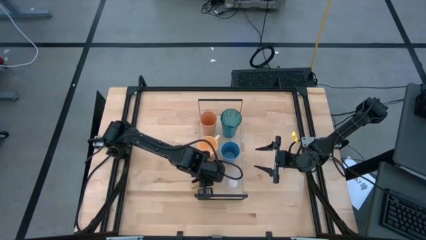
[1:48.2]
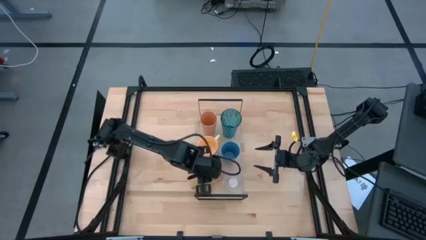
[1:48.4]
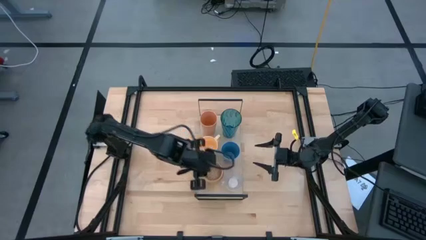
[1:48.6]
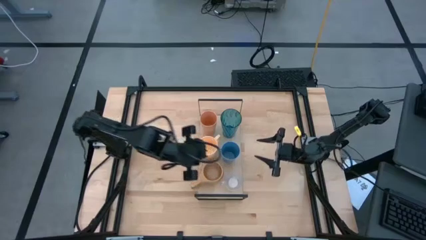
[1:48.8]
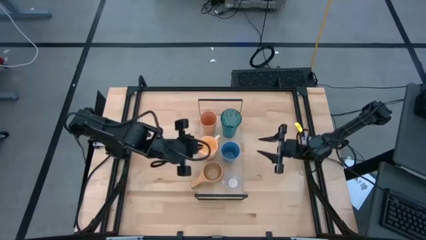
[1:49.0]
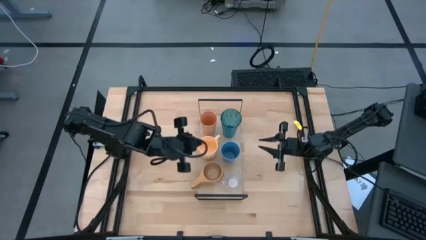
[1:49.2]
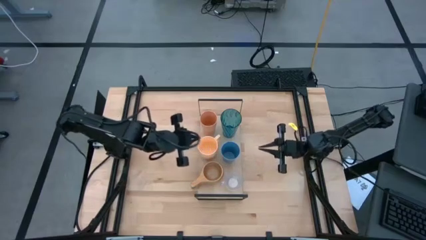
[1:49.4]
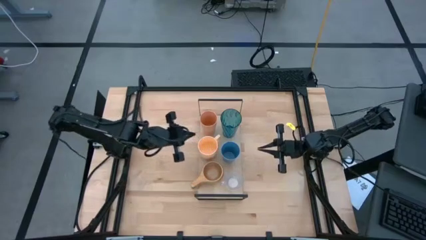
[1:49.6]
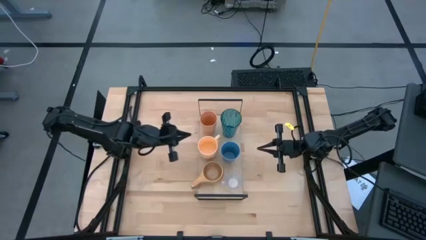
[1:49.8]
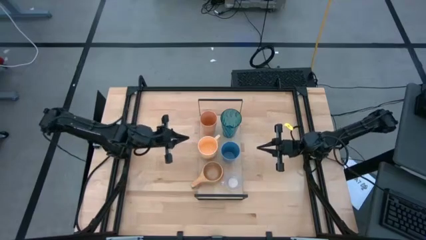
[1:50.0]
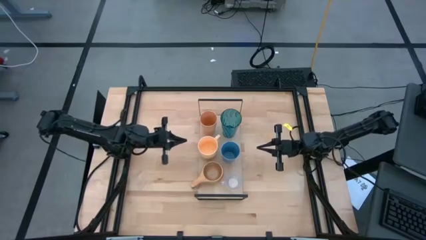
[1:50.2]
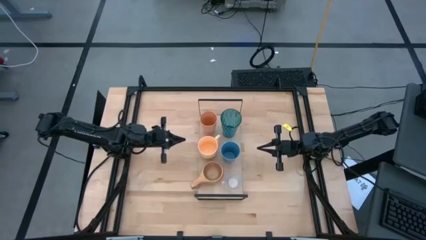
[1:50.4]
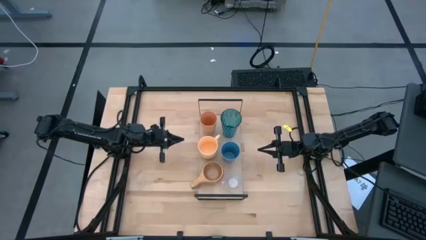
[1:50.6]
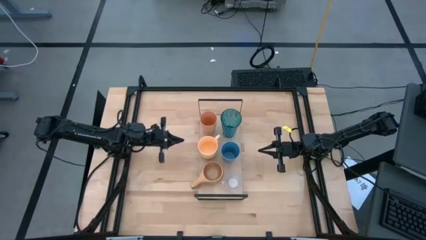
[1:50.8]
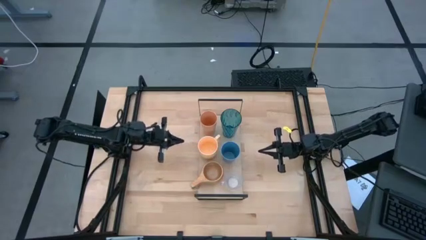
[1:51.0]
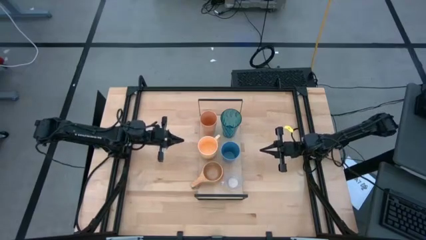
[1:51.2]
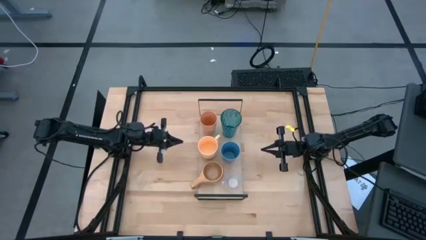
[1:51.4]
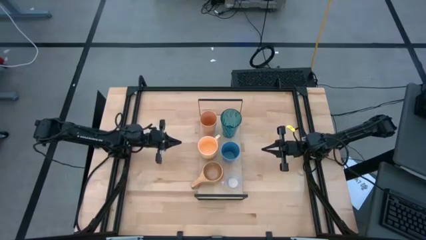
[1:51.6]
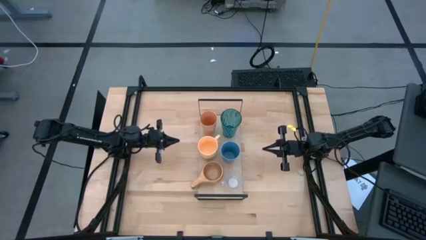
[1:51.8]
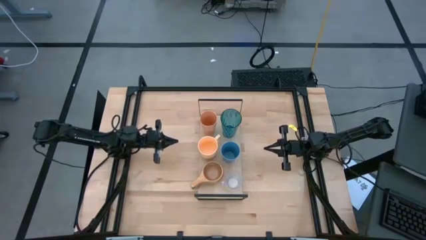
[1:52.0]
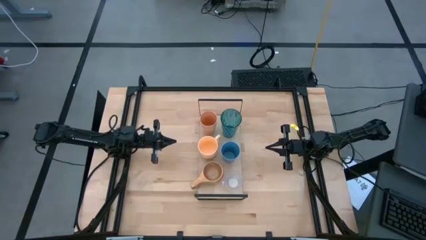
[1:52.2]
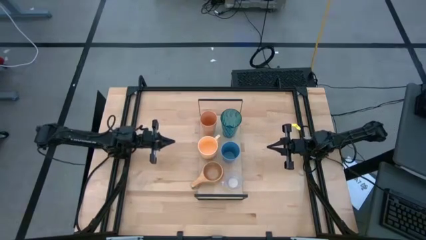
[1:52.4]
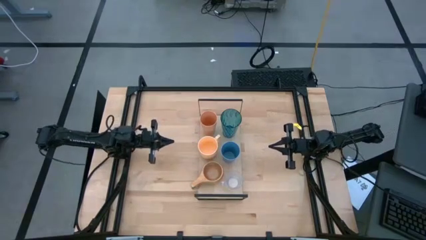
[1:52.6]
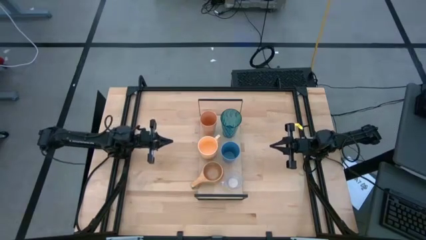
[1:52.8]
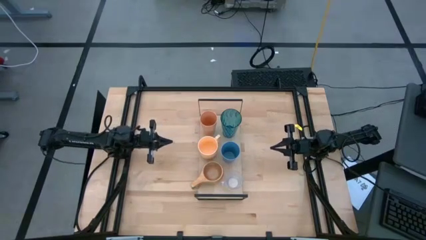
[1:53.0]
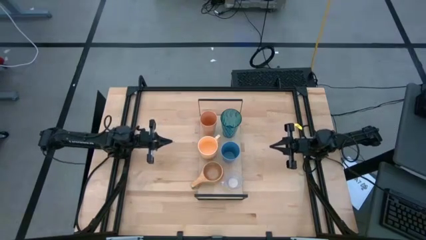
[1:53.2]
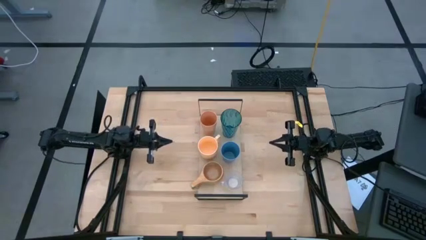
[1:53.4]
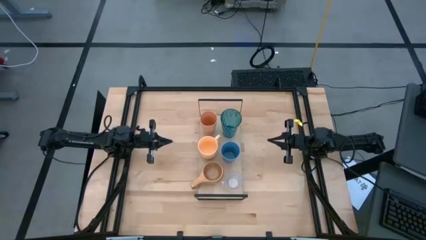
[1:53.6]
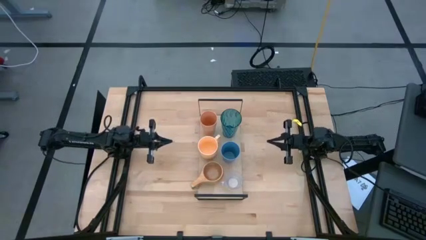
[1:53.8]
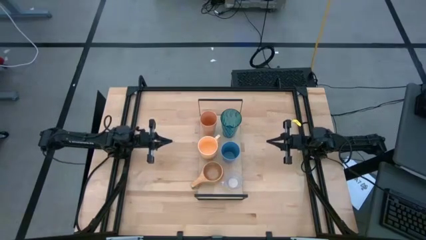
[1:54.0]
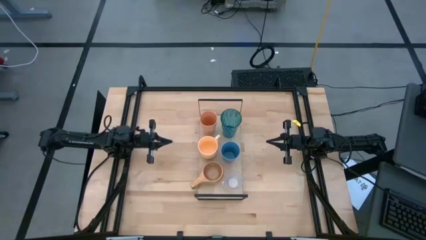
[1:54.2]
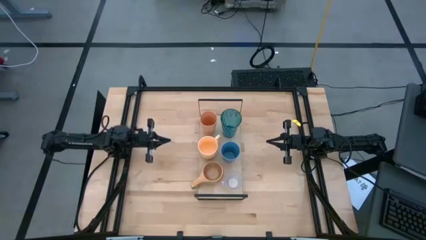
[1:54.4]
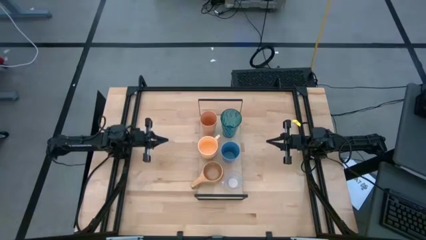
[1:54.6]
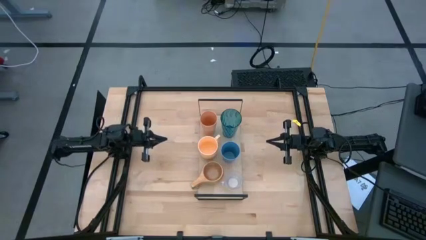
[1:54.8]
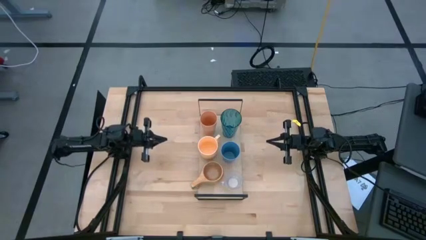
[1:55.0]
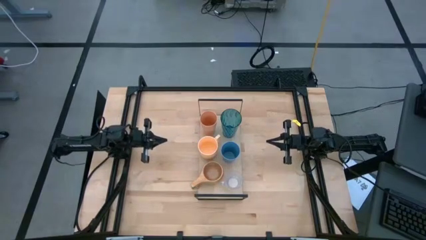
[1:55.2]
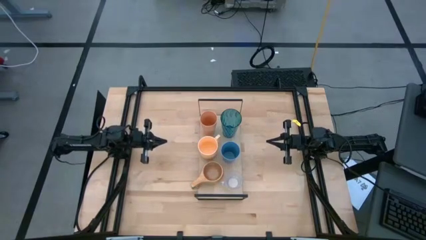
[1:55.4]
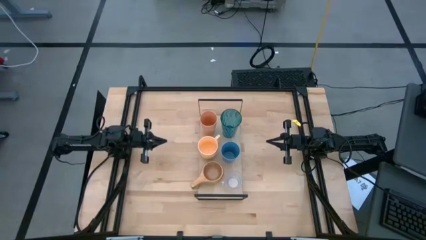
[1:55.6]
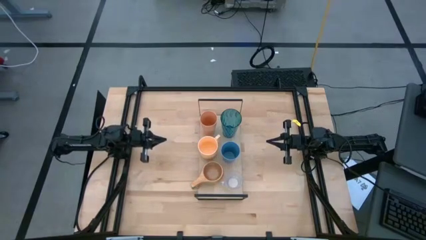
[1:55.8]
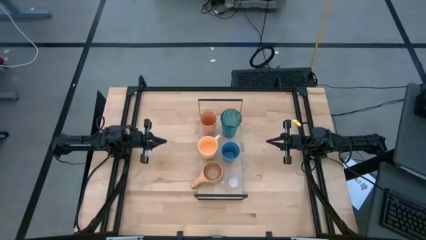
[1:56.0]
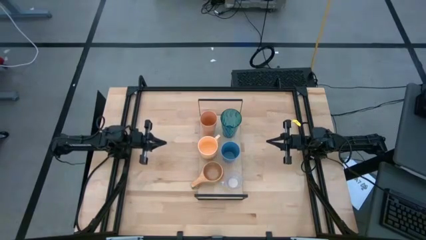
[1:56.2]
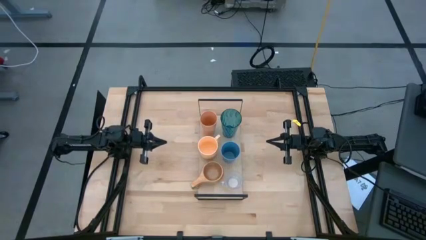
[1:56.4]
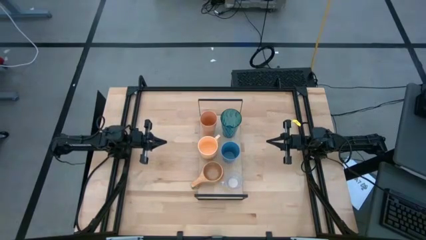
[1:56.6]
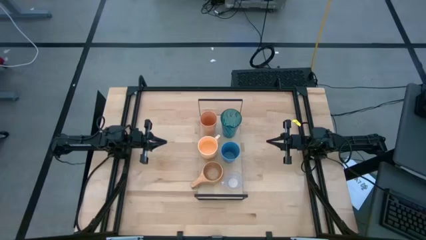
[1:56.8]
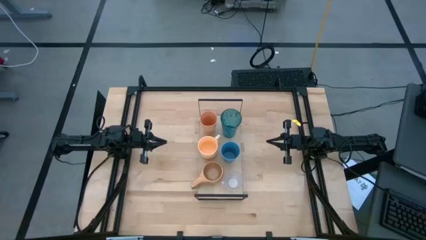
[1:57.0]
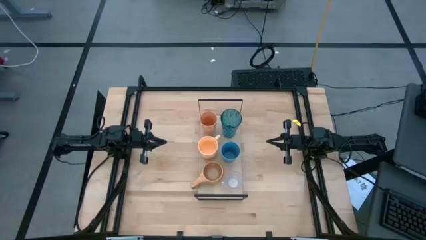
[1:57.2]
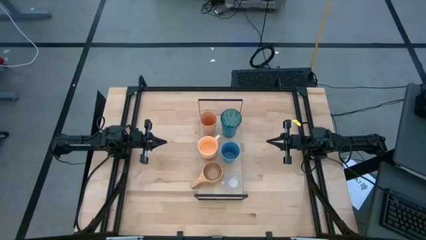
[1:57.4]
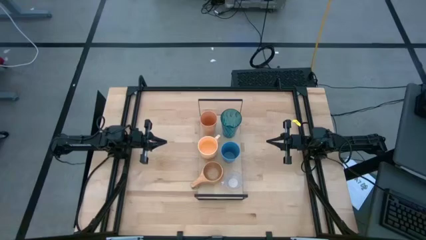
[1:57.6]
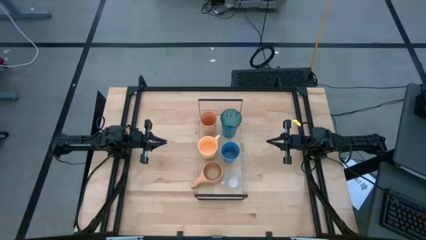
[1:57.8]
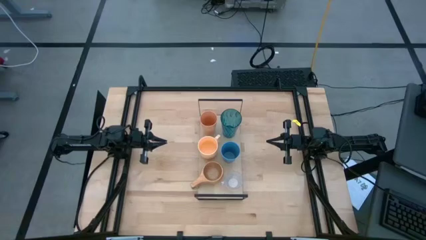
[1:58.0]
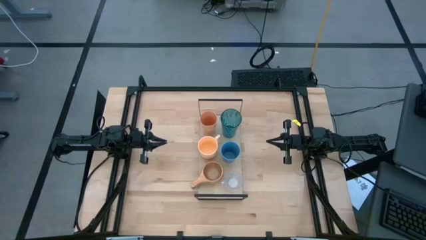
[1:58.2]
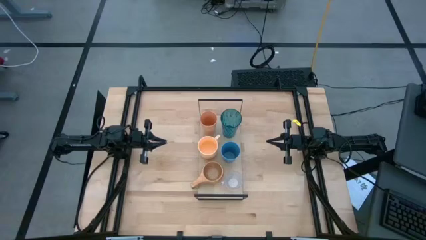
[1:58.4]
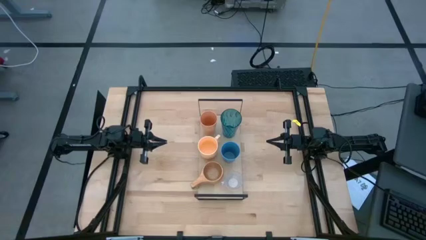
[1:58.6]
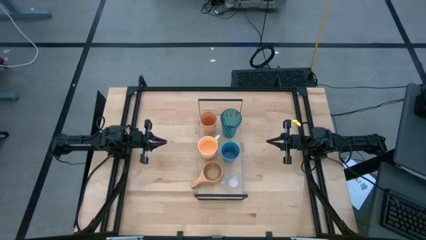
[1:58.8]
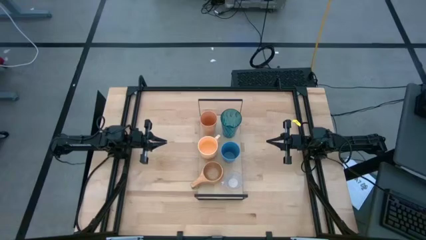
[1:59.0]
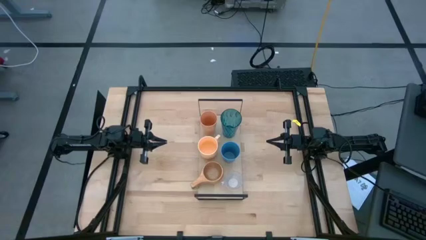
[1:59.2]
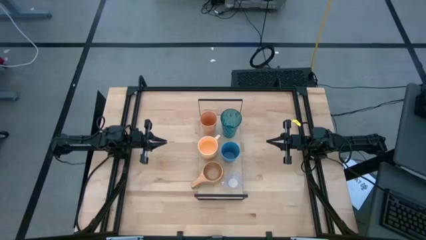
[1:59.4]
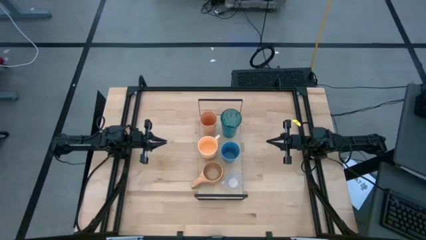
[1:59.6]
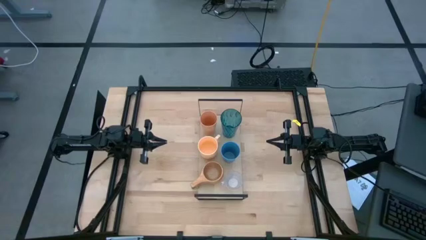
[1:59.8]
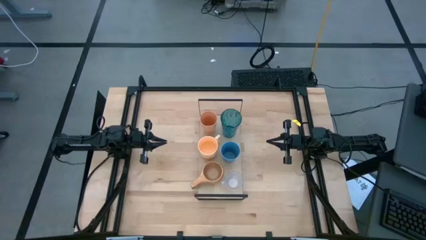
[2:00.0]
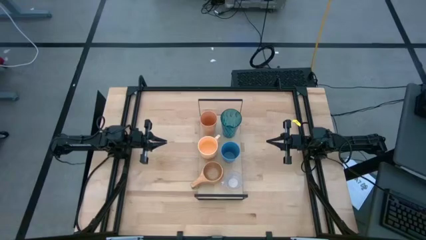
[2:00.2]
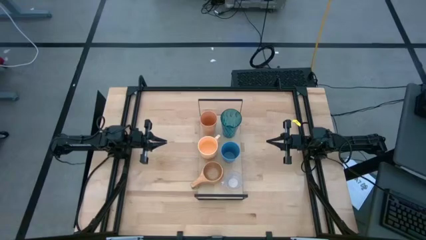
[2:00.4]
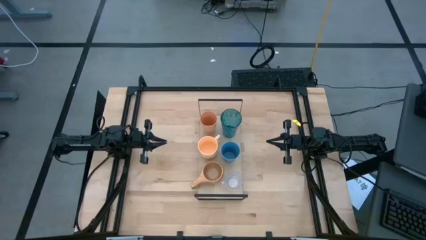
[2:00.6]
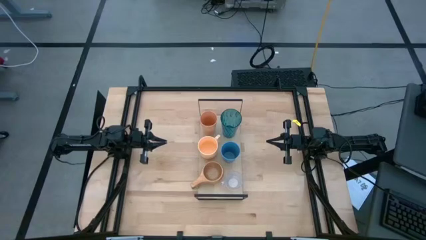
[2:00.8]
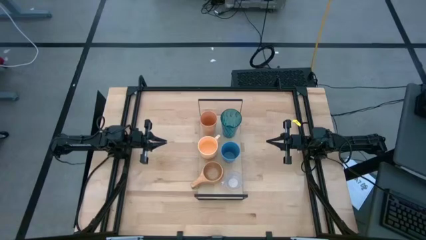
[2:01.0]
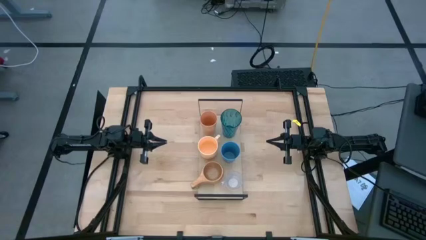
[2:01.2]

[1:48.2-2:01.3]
Task: Stack small to large cups/mugs on shelf
Return to Home Position

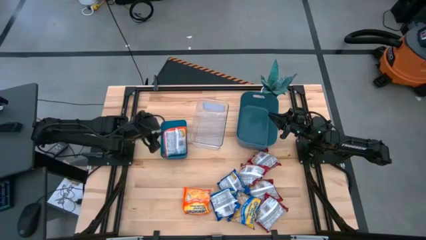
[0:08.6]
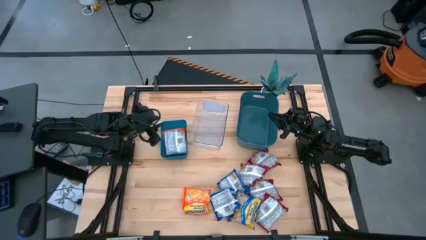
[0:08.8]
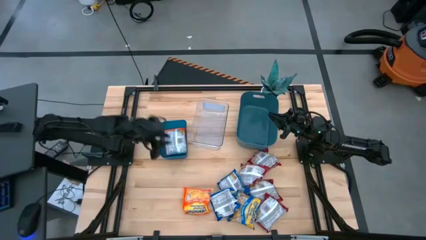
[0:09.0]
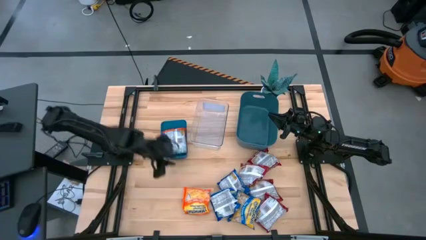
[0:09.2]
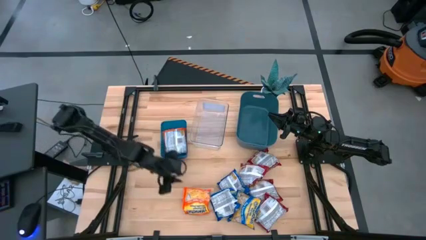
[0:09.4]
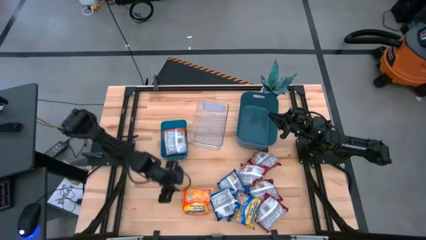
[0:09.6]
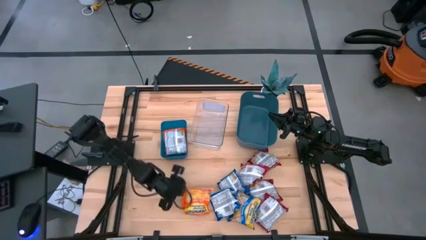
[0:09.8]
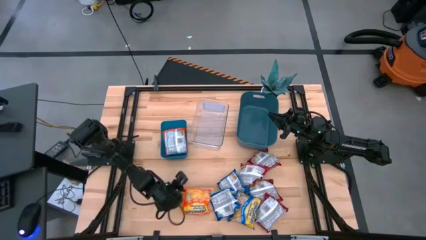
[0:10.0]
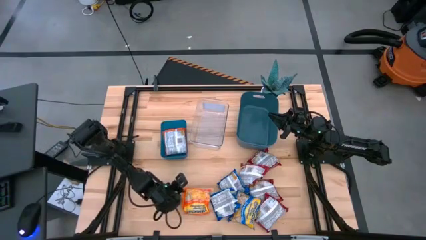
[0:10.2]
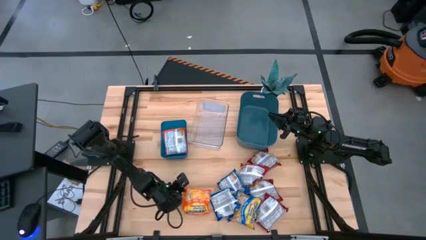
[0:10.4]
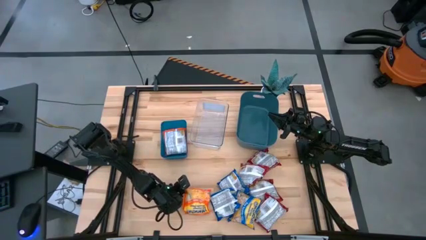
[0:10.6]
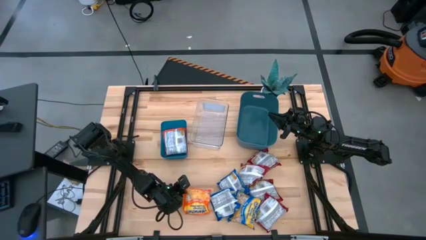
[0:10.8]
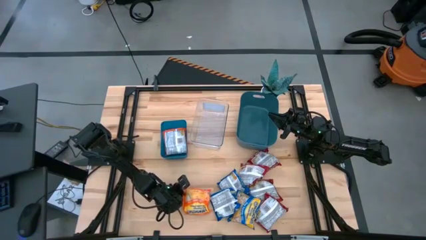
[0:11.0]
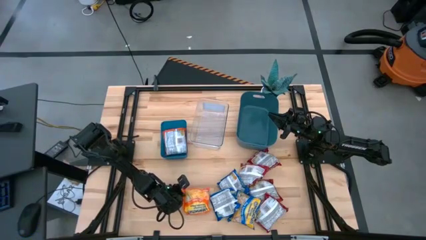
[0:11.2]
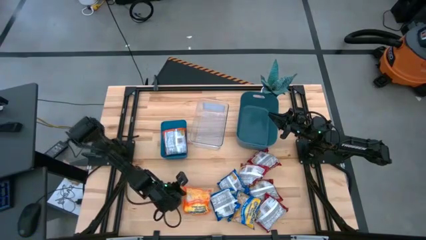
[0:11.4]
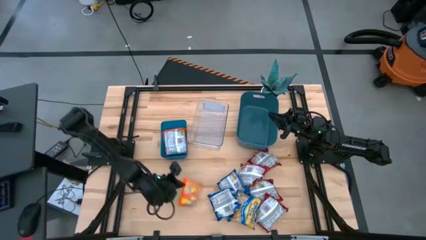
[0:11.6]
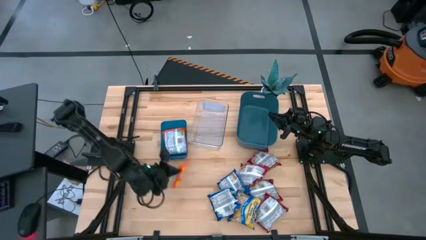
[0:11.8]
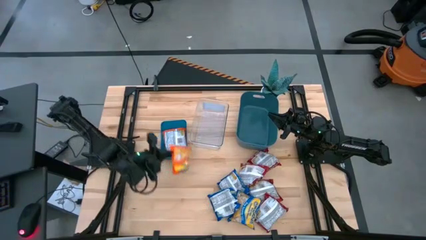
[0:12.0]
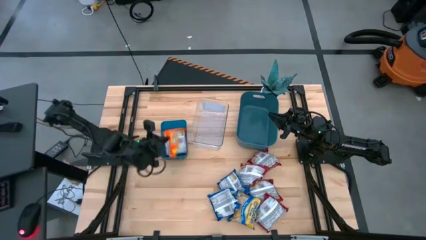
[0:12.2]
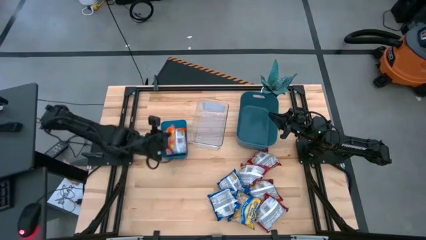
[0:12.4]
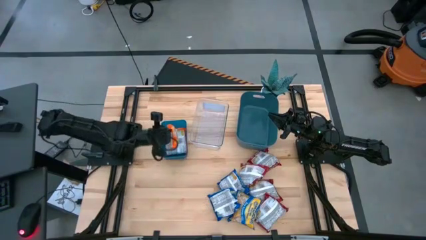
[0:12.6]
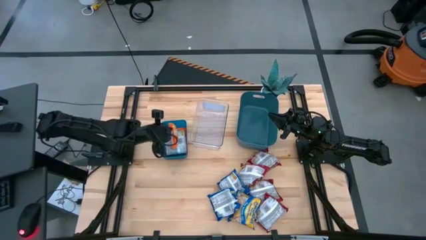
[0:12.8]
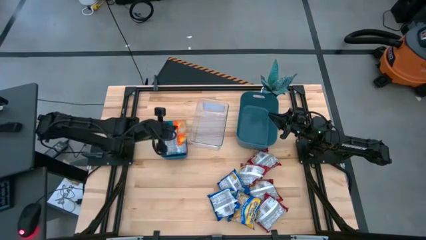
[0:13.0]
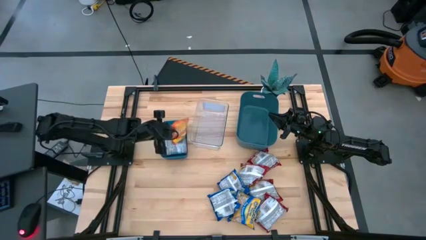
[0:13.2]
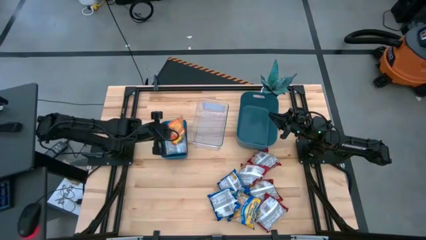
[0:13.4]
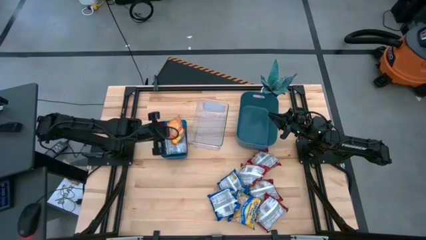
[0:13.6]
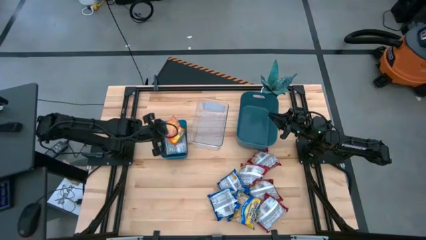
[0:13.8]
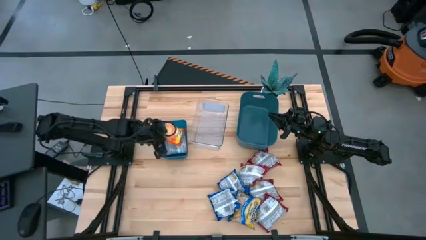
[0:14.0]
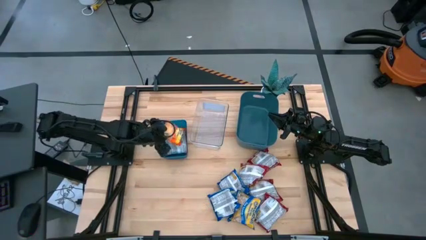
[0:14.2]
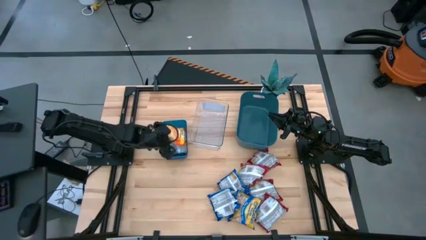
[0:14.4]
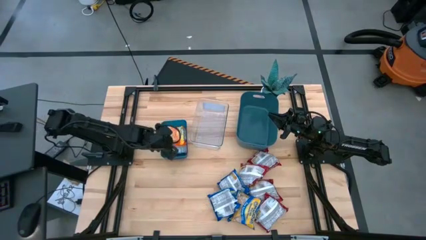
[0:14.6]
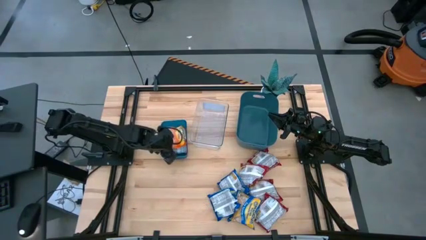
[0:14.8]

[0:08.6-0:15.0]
Task: Sort Maruchan noodles
Put the orange noodle pack into the blue bin
